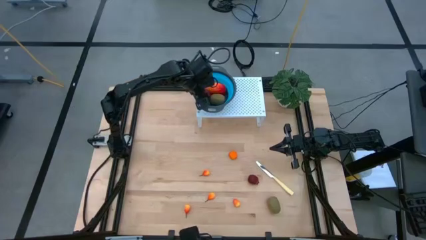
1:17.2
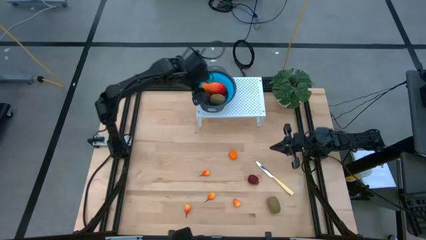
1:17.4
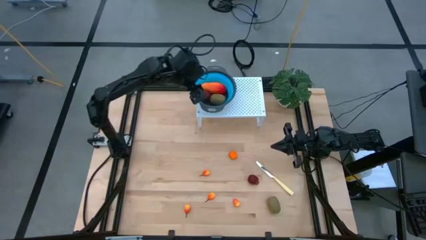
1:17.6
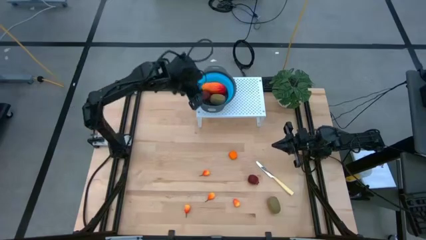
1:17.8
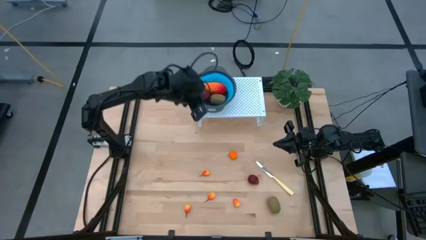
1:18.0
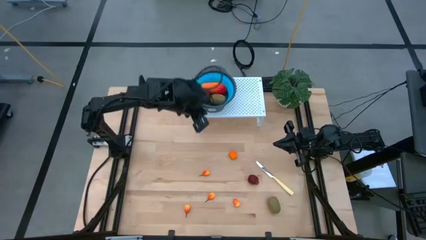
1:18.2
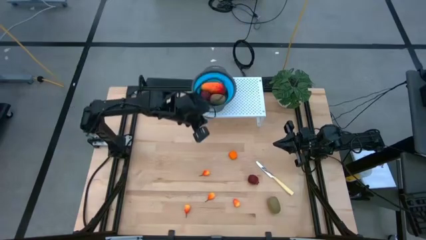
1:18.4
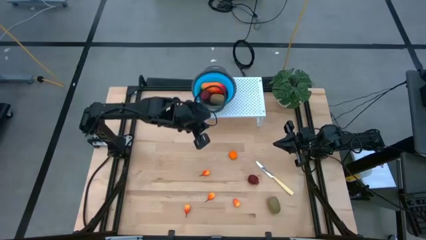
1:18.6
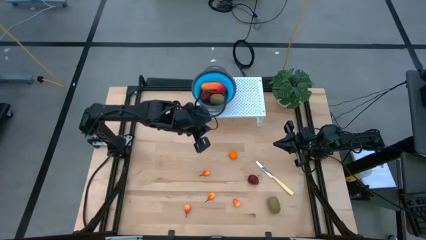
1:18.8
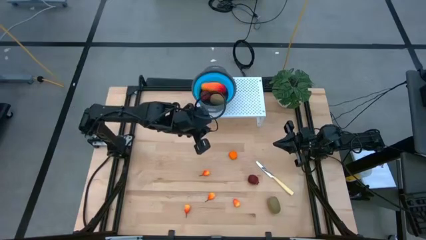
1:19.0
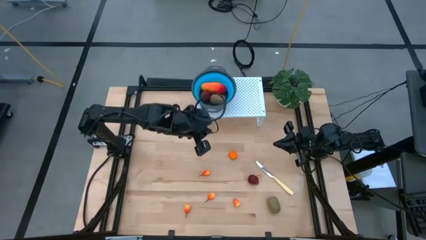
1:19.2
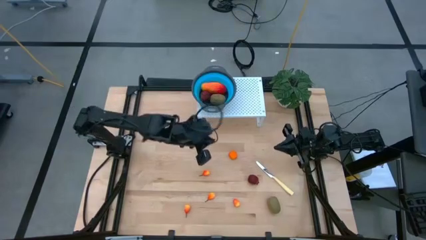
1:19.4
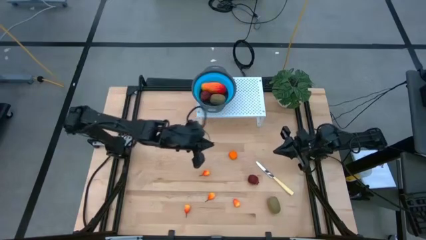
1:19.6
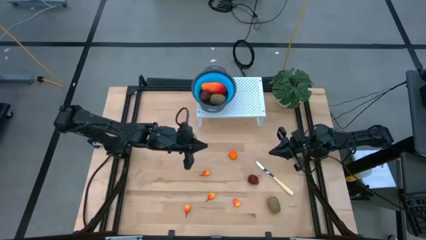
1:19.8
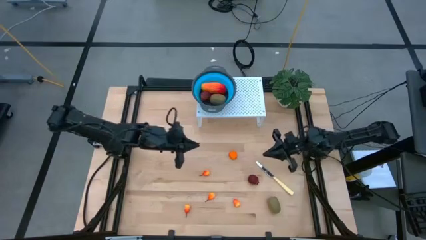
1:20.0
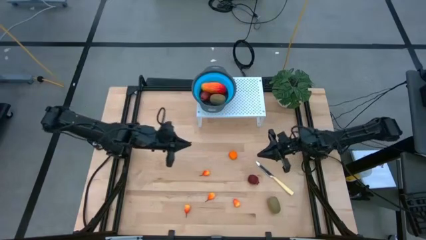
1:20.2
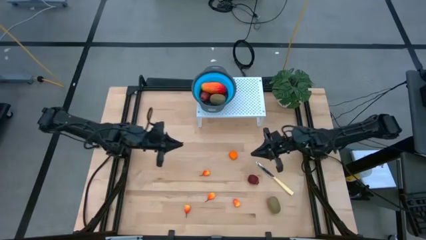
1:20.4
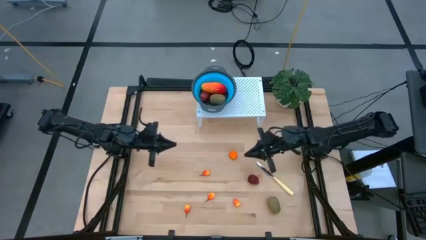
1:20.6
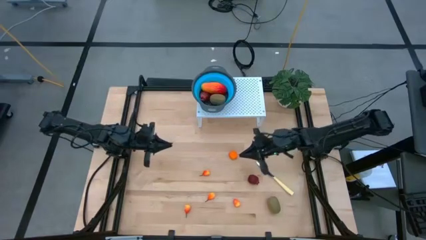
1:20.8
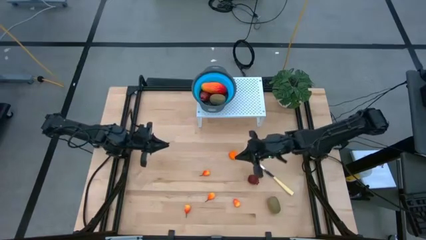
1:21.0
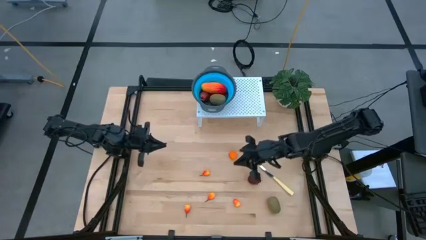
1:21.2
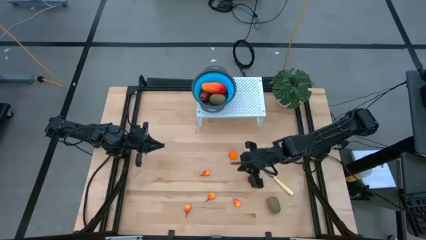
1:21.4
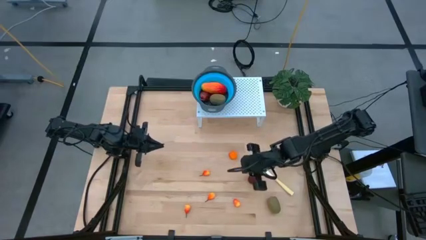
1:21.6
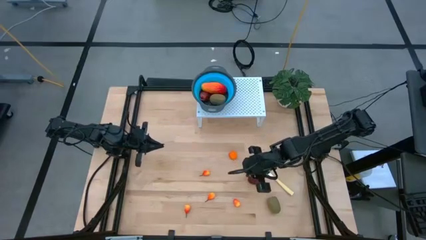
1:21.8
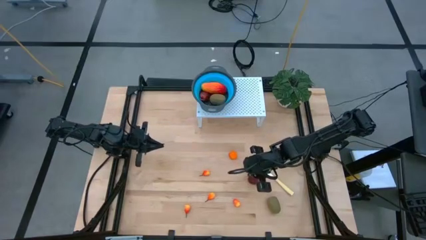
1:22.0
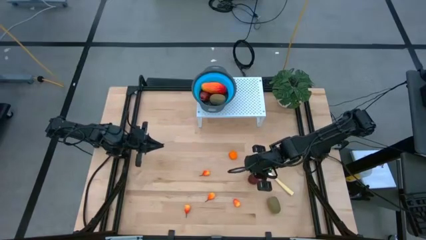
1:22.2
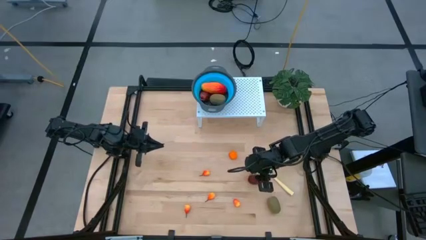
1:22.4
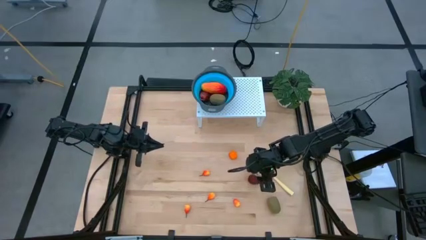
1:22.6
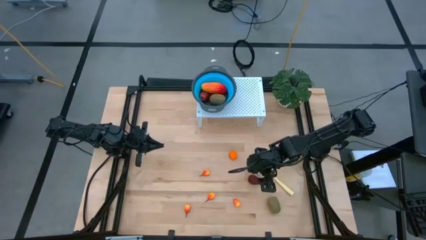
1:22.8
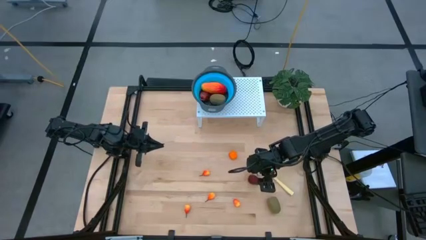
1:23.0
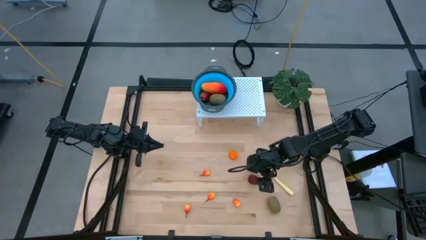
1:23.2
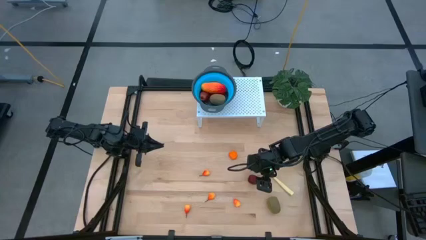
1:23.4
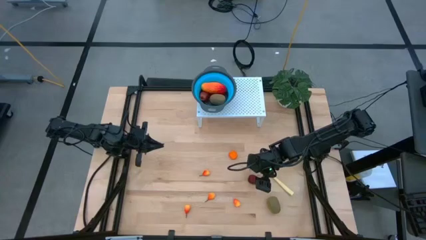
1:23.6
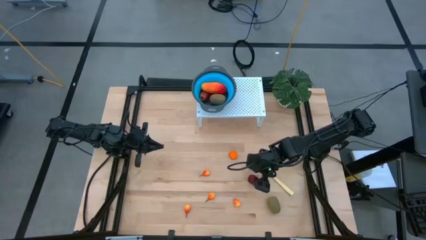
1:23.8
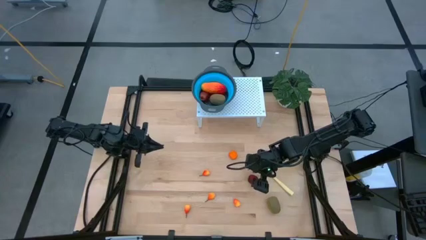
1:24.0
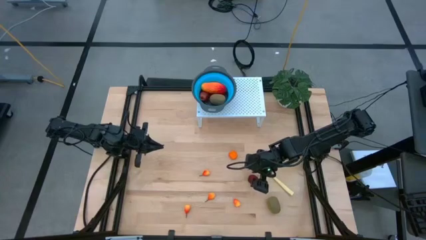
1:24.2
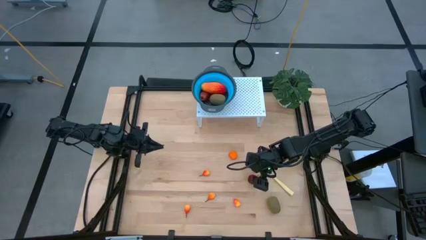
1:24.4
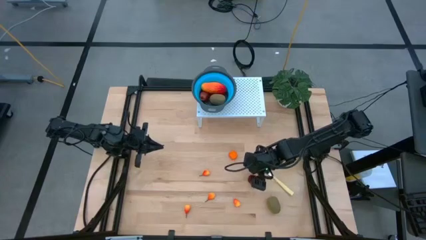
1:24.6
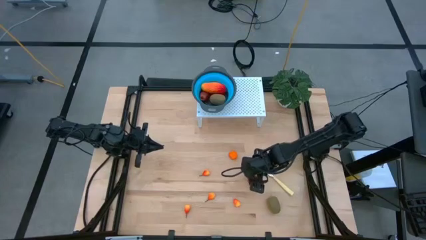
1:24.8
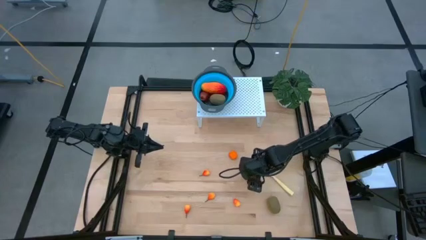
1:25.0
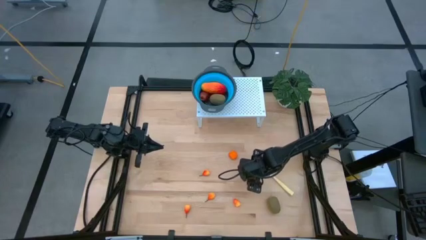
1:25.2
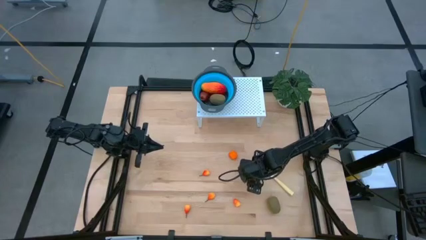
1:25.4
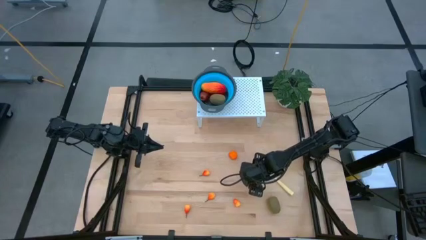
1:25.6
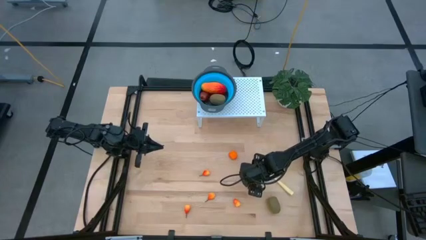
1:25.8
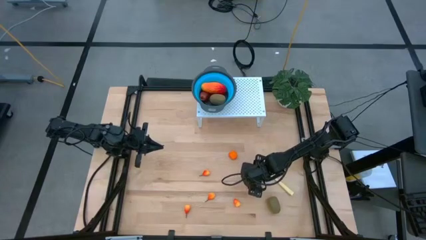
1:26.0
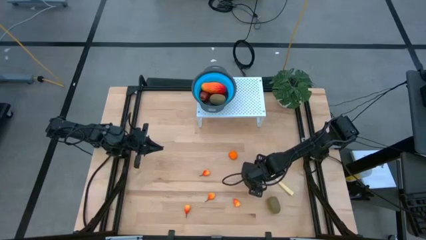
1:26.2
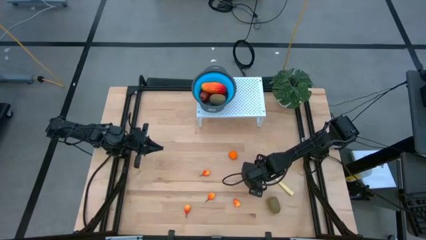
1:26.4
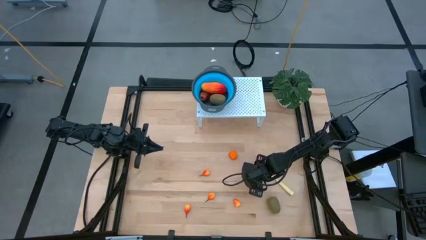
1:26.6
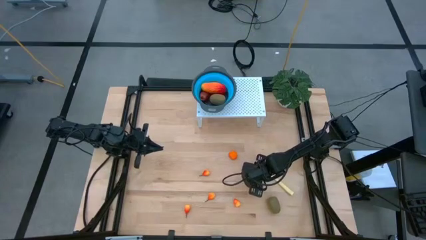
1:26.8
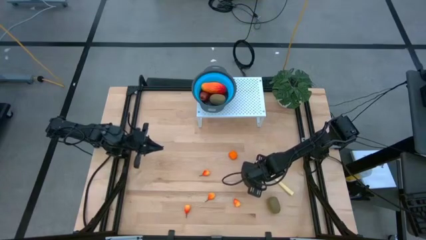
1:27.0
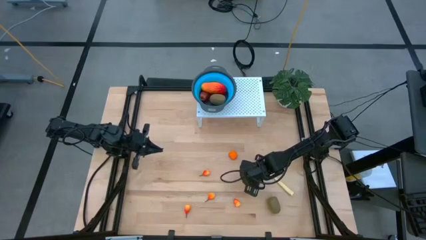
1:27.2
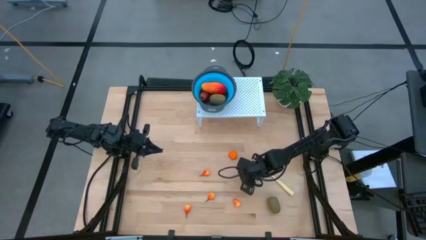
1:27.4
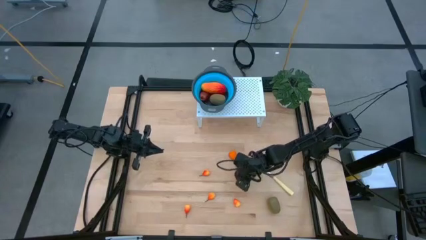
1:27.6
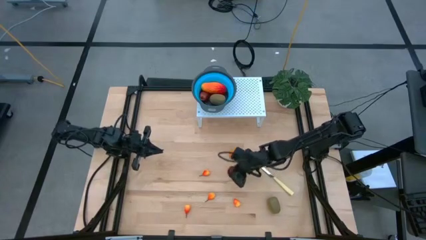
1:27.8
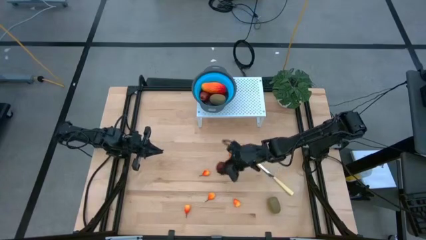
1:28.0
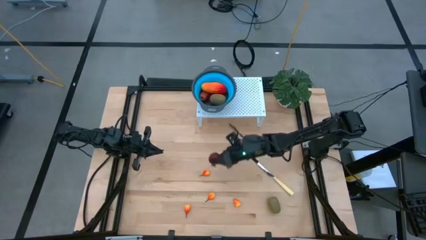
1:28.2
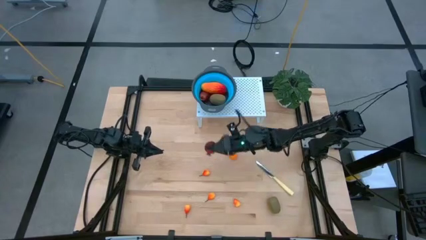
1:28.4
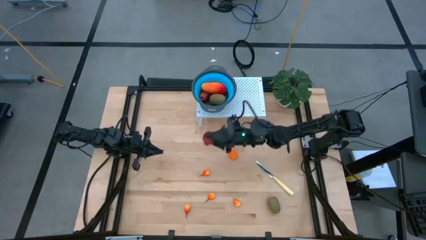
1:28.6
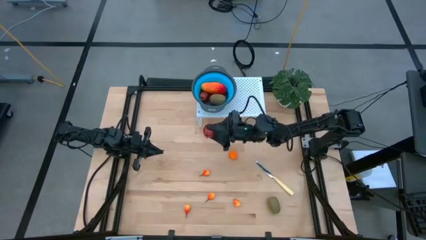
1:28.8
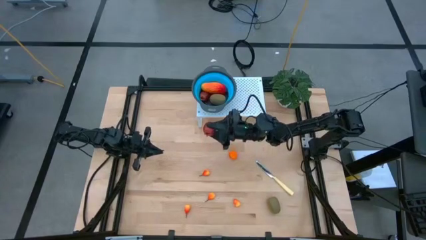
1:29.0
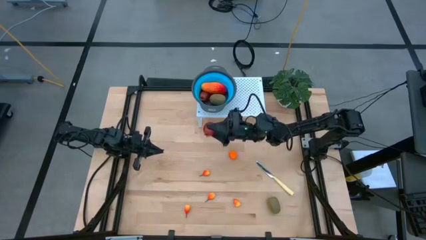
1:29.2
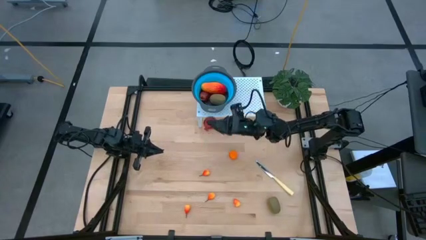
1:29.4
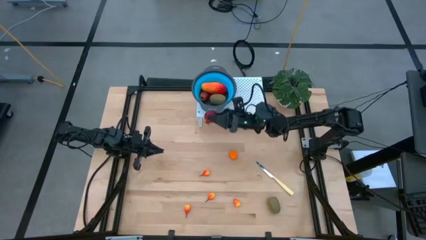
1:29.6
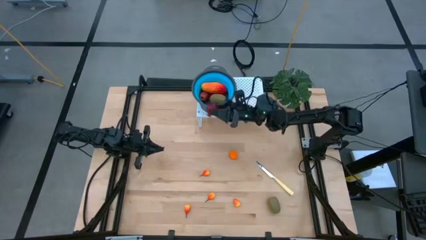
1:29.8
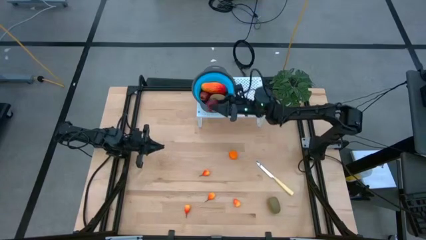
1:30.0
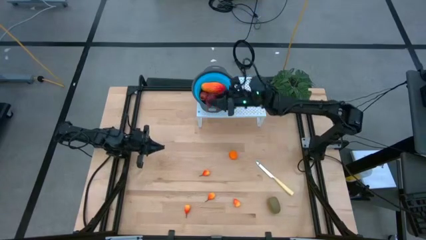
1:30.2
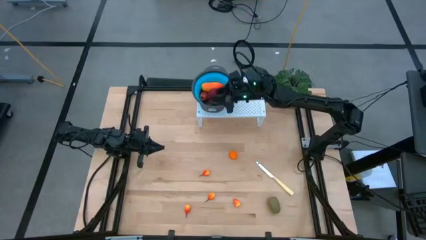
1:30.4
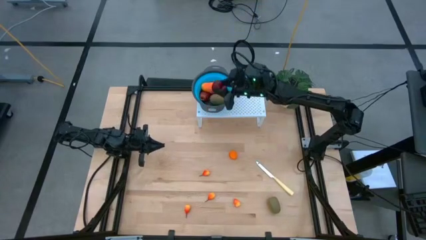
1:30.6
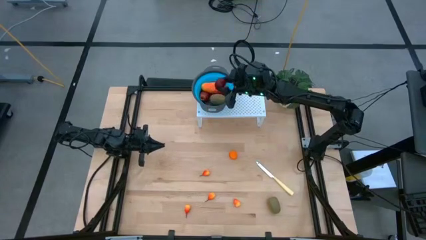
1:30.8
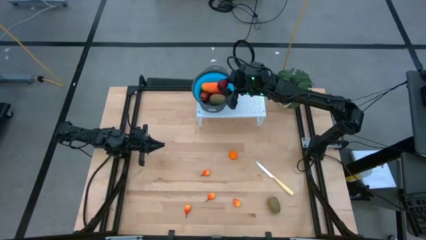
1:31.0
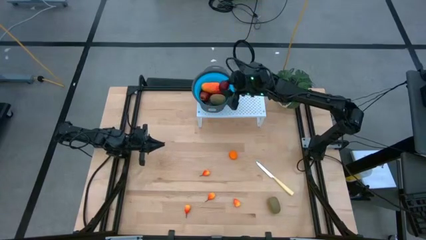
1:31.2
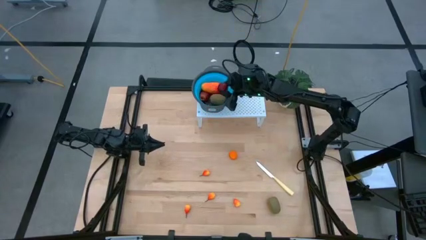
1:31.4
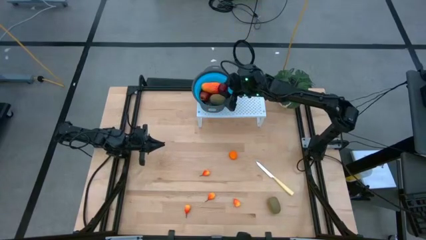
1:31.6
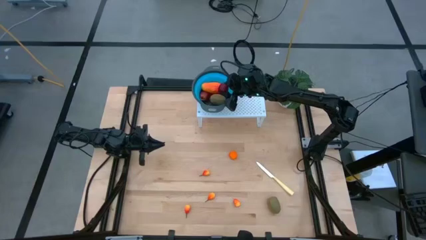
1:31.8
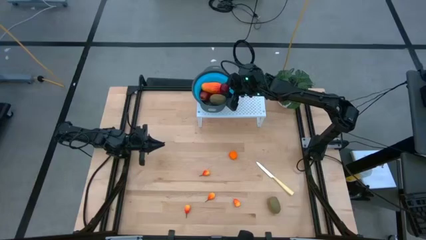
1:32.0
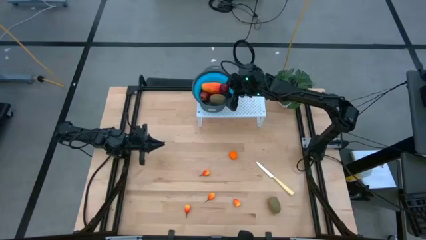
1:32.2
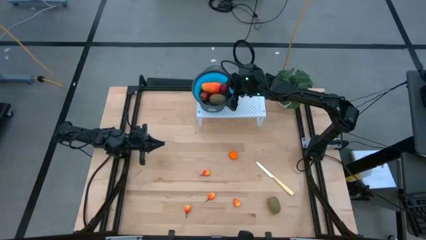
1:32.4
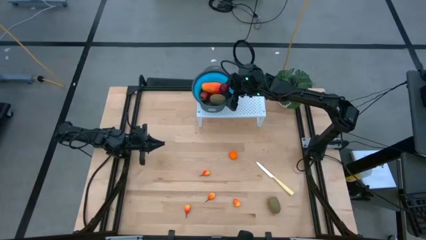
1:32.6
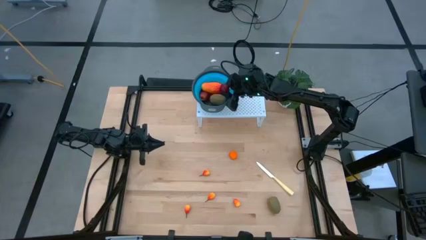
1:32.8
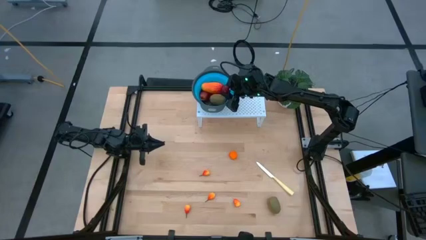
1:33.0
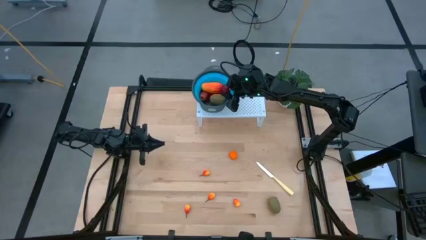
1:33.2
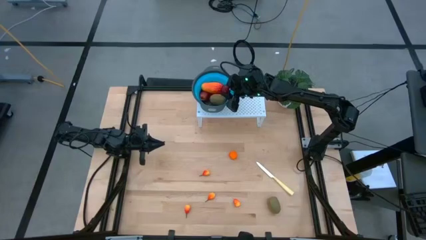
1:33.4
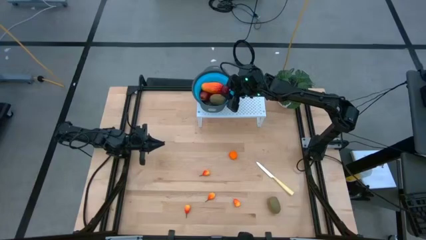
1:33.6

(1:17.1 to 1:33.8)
Task: Pick & Place Fruit
Put the pomegranate into the blue strainer bowl on the shelf
